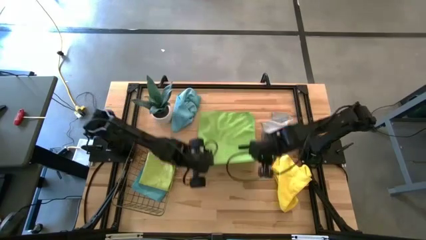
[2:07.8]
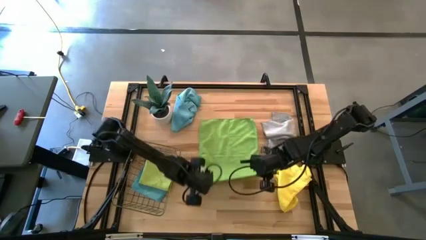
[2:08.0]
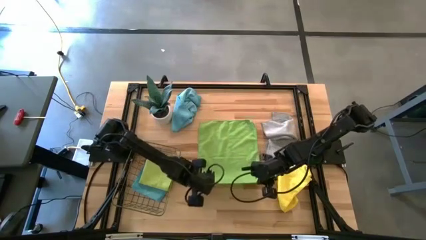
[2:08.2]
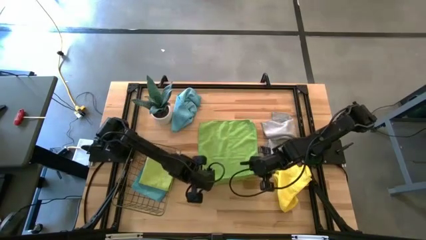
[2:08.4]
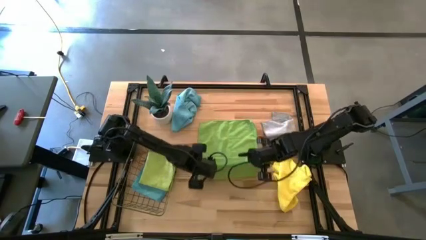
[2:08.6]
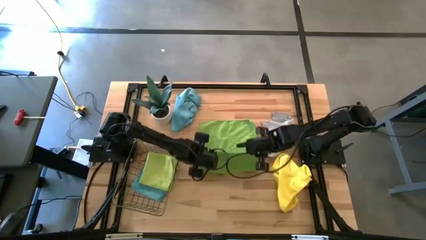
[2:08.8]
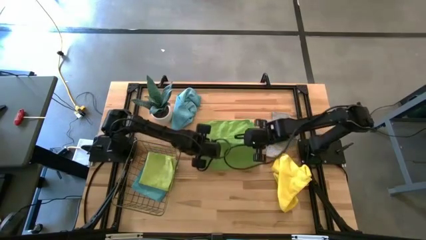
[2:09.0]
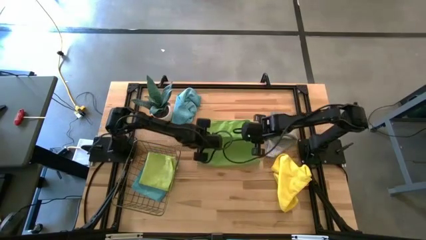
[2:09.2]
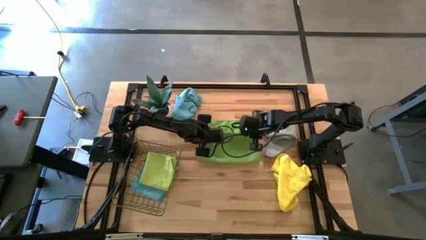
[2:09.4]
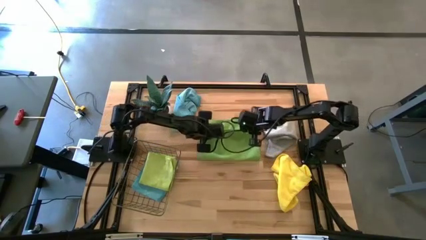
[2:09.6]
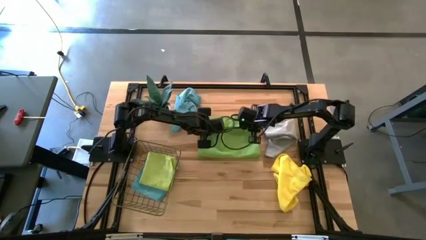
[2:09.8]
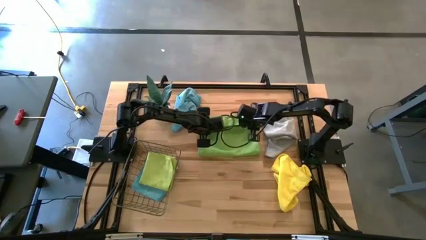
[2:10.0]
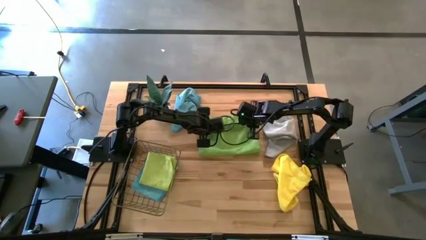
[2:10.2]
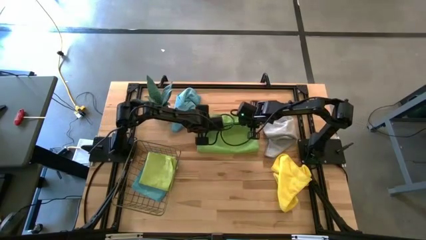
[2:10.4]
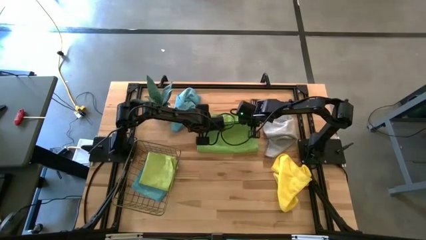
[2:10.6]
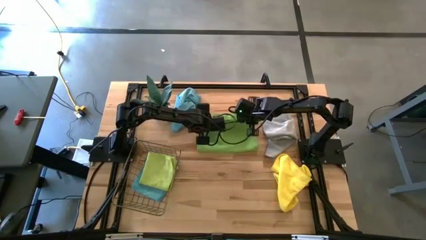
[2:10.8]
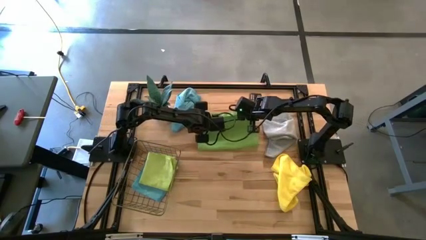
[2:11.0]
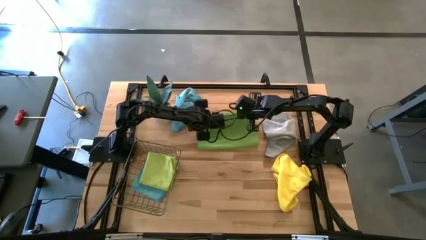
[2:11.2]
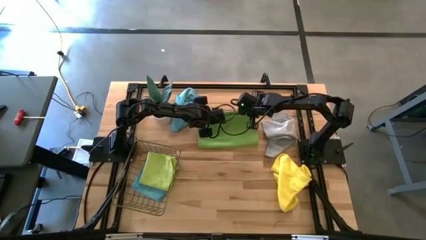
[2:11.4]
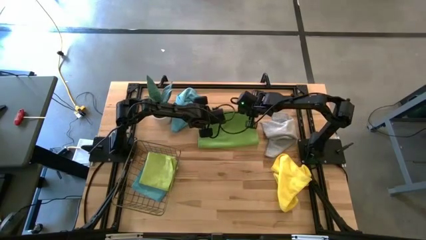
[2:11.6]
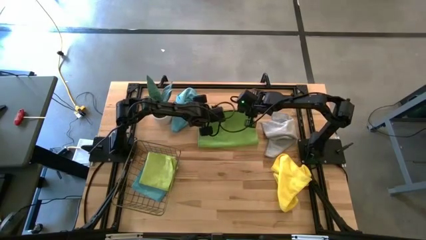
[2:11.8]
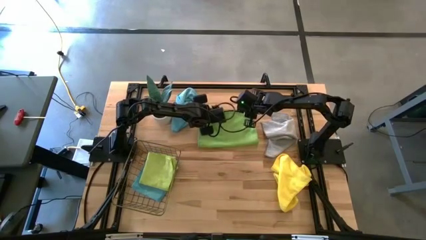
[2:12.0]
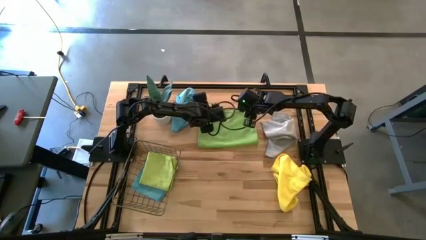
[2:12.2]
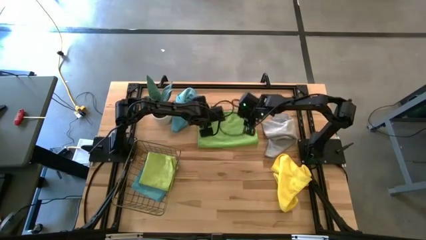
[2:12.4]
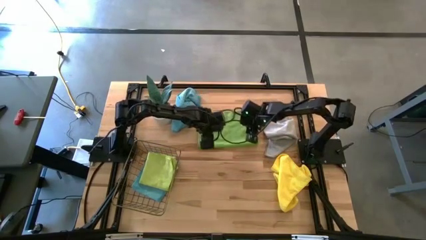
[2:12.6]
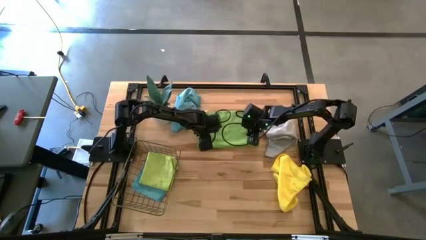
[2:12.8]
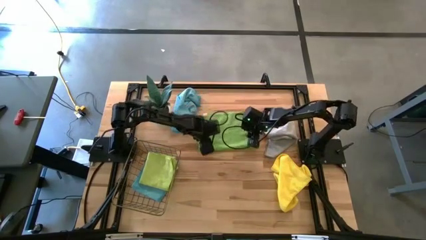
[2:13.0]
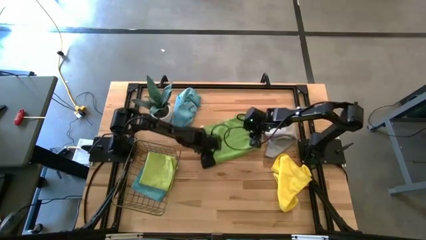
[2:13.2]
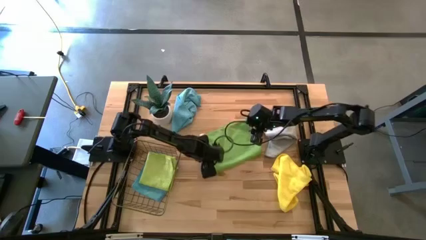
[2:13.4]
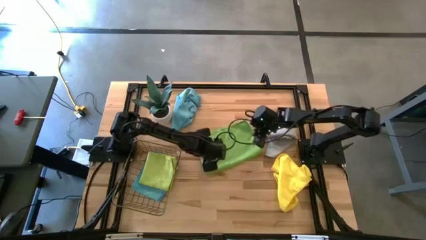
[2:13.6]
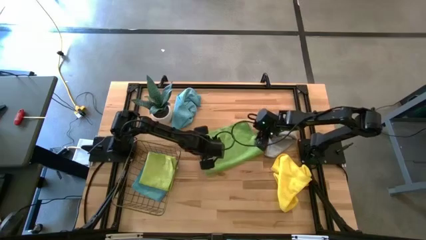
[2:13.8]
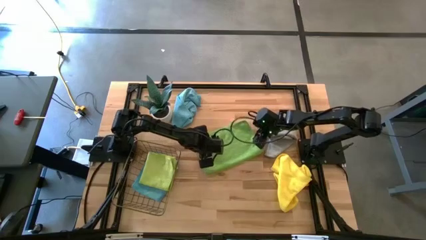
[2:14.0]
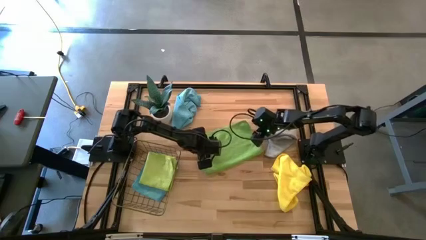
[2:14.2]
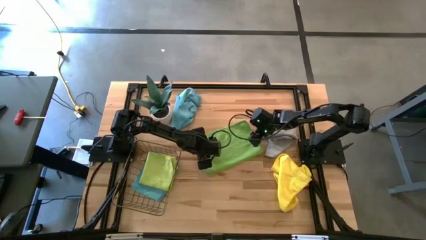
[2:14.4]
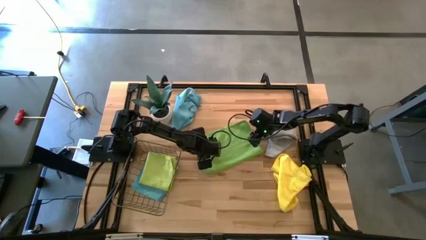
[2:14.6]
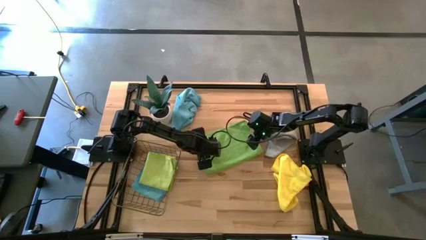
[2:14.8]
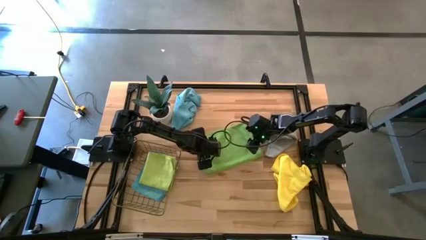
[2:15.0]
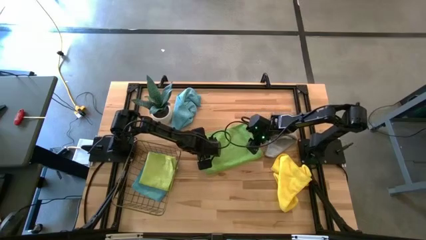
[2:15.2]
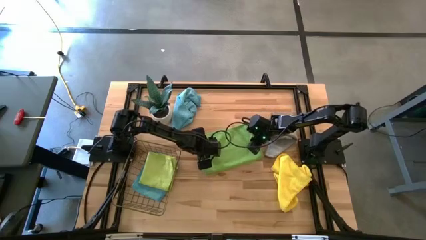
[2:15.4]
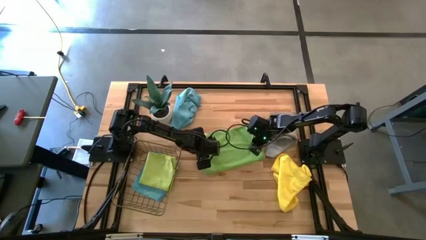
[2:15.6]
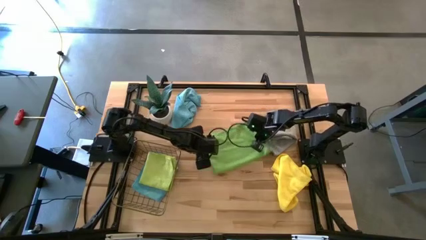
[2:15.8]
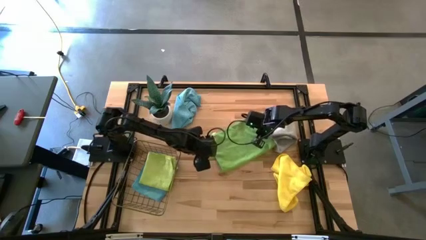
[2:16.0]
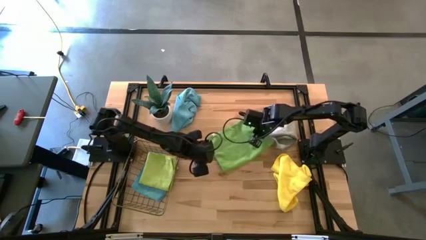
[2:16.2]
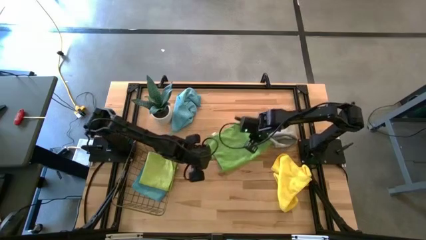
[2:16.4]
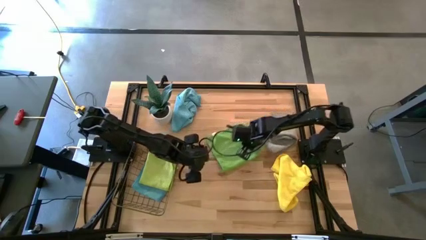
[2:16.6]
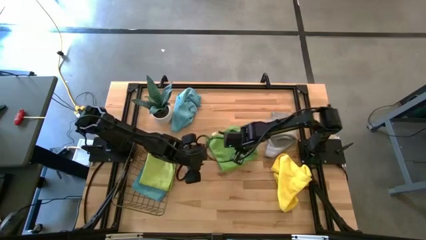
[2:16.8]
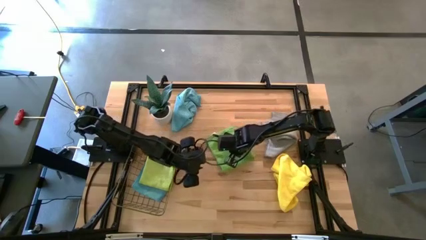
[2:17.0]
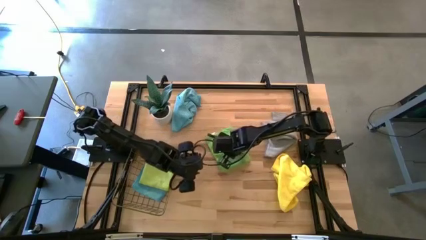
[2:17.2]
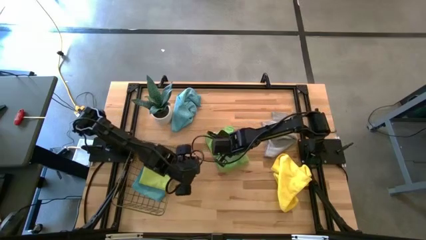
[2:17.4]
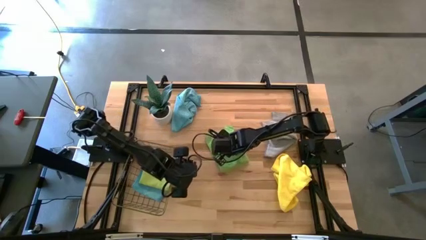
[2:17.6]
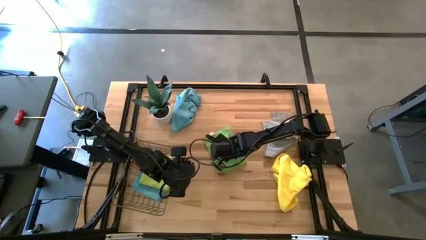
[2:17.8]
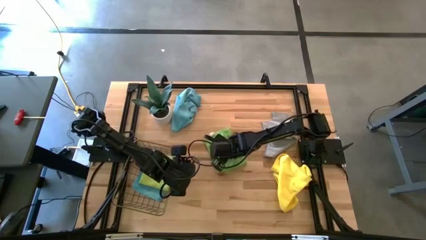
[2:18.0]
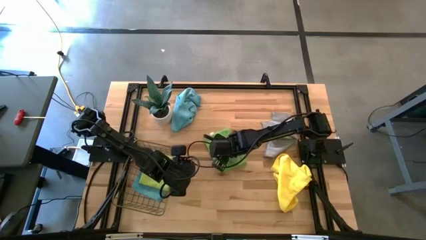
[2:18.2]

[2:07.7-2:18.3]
Task: Fold microfiber towels
Fold the green microfiber towel

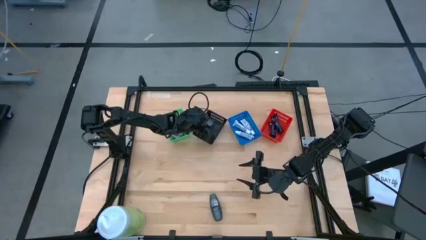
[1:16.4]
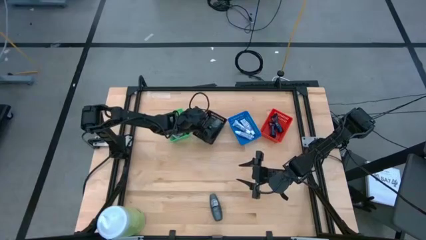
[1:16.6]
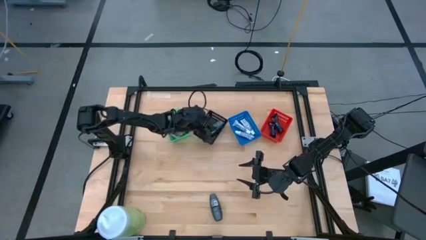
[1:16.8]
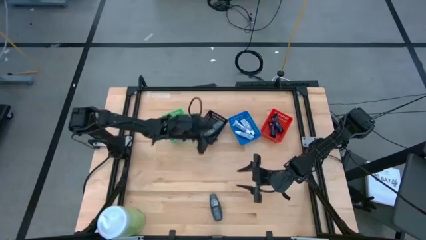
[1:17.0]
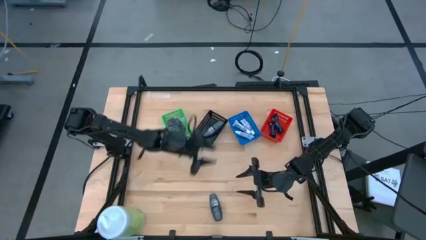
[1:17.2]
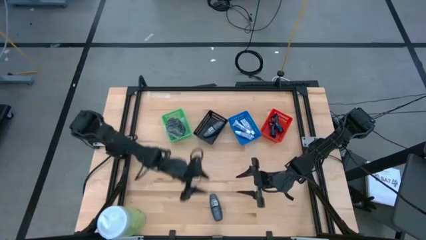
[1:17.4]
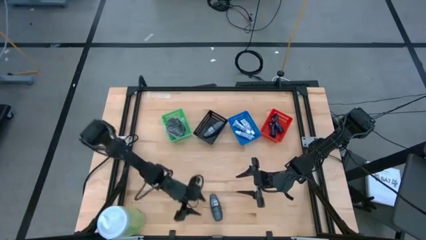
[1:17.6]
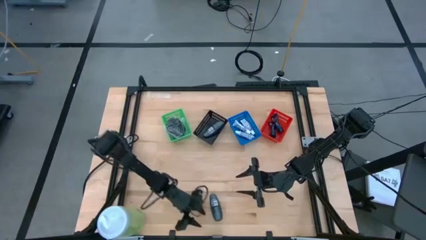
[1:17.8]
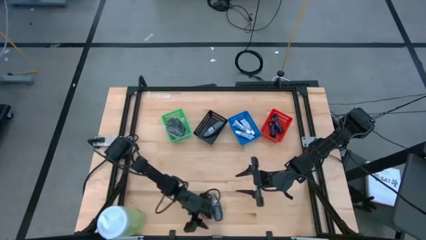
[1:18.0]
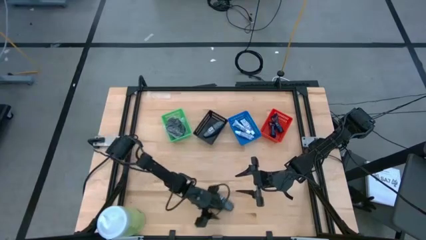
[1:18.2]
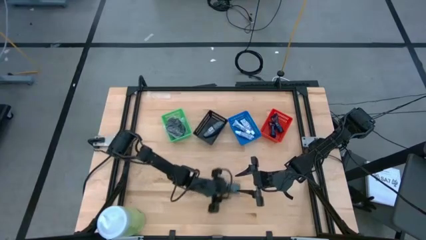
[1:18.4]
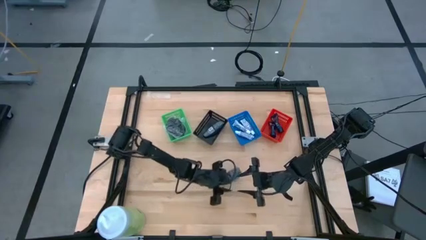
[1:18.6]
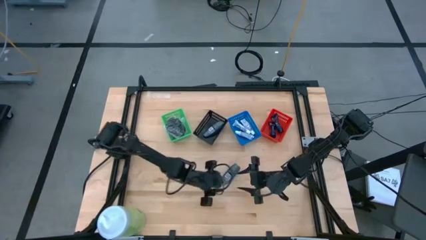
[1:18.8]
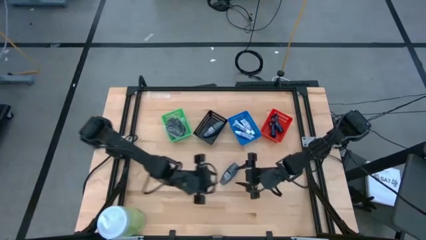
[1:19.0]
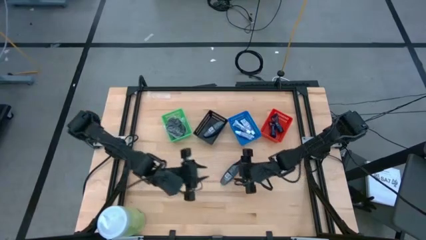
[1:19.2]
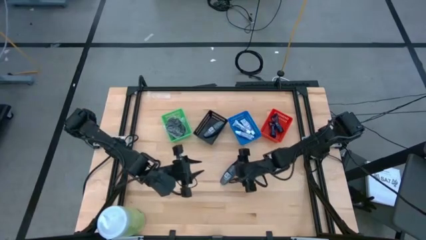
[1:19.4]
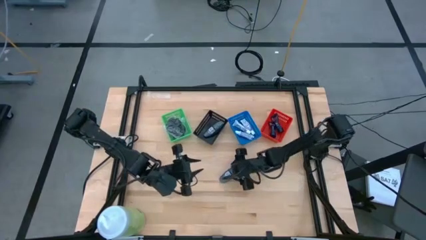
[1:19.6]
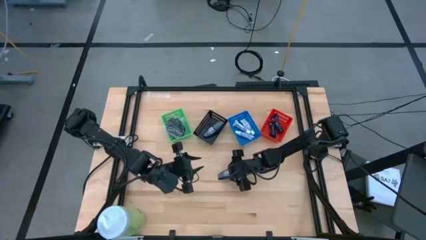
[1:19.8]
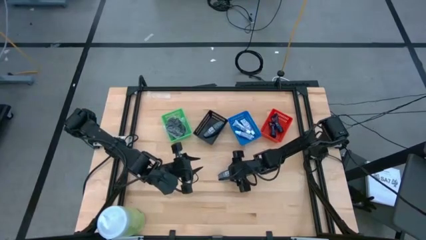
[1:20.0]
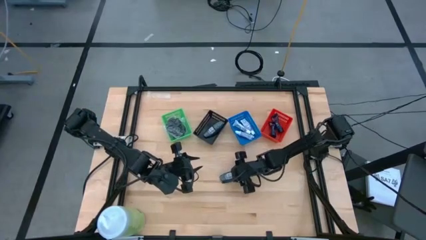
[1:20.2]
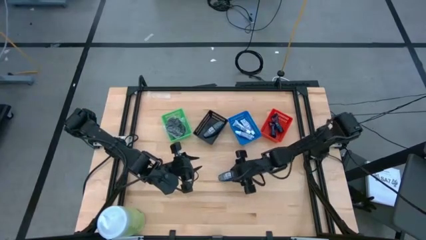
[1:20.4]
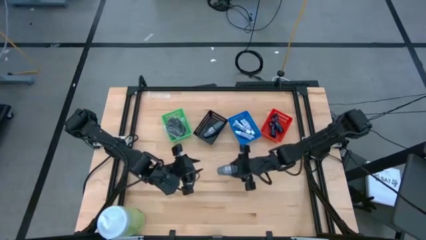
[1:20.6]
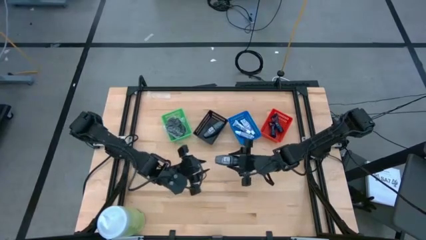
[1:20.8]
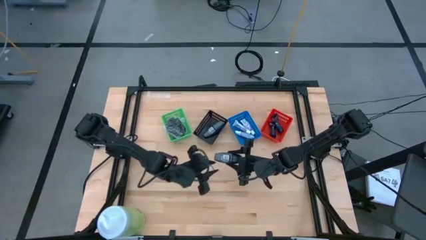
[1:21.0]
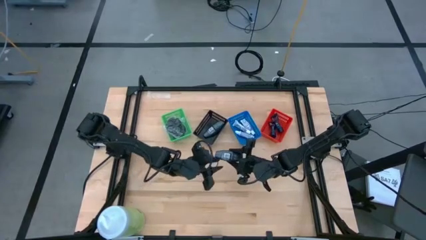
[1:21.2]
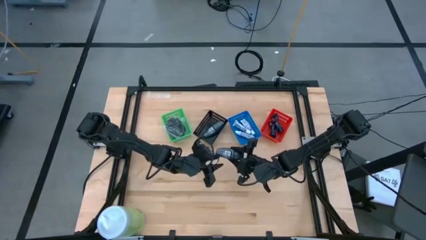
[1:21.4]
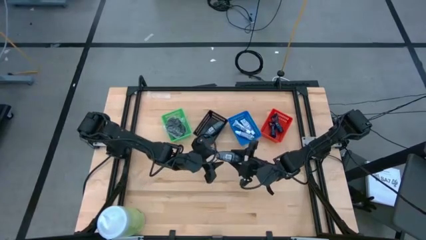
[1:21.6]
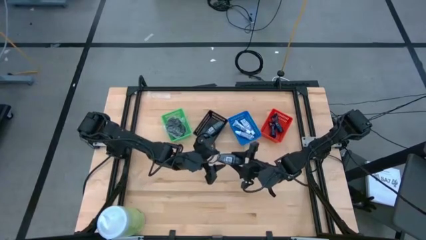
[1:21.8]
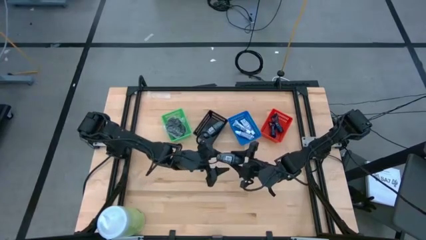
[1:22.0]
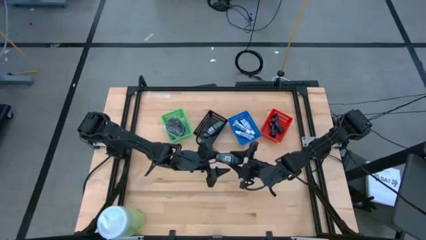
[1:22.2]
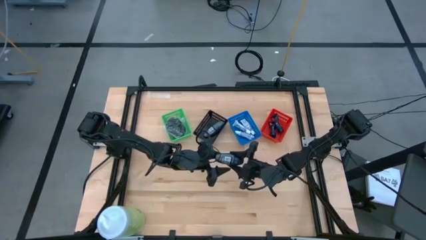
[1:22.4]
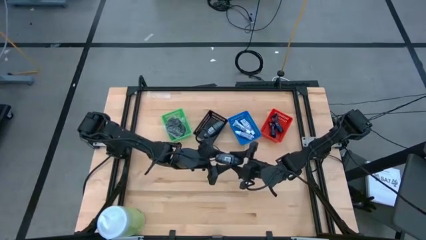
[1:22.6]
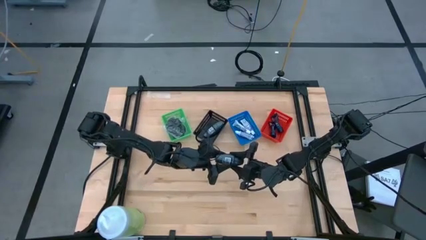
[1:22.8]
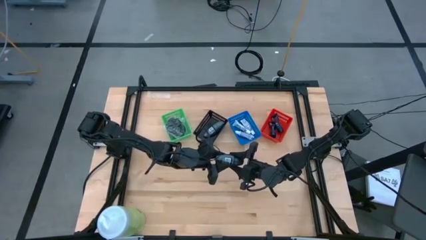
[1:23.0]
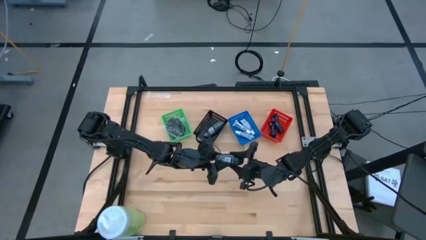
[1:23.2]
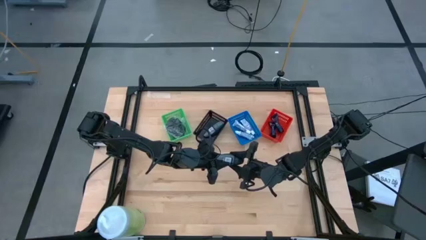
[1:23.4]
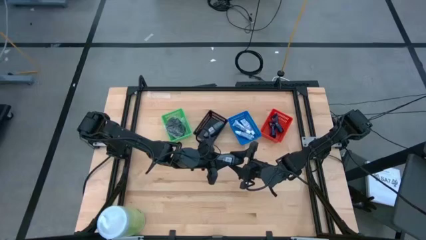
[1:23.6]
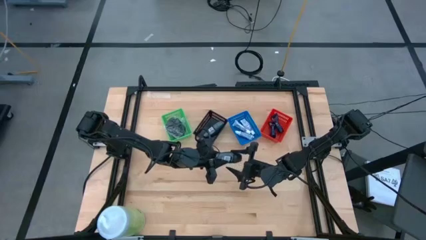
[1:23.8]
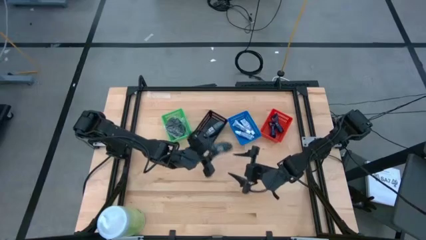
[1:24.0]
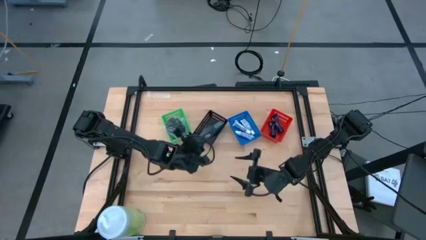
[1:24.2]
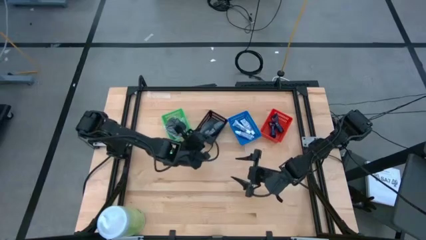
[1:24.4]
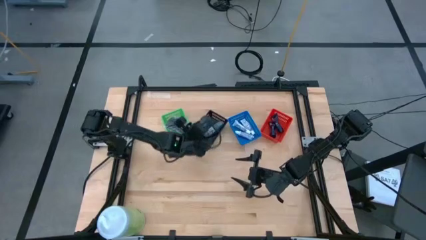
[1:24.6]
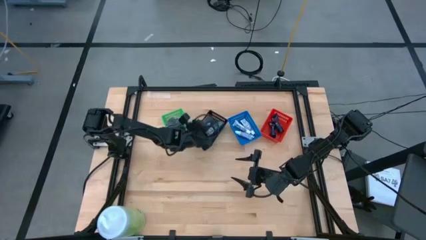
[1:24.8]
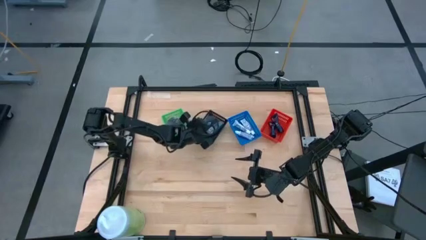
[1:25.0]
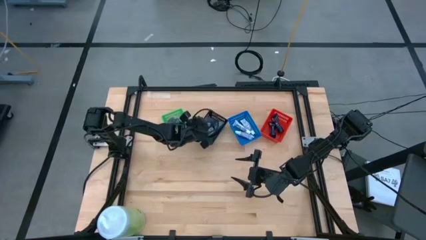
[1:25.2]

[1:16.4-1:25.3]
Task: Pick & Place Travel size toiletries
Put the black roll-on deodorant into the black bin
